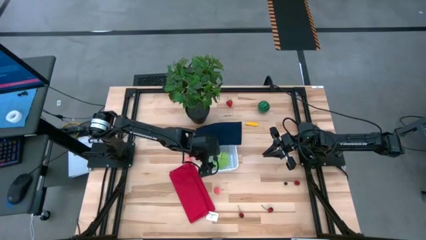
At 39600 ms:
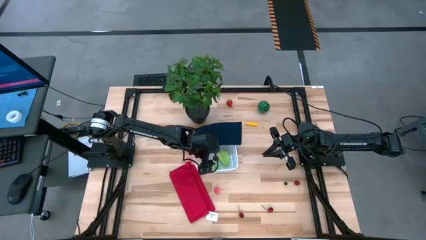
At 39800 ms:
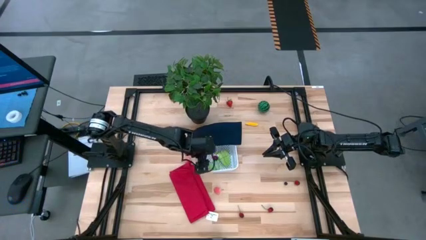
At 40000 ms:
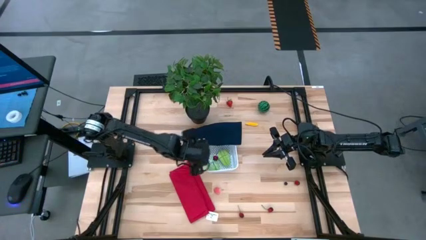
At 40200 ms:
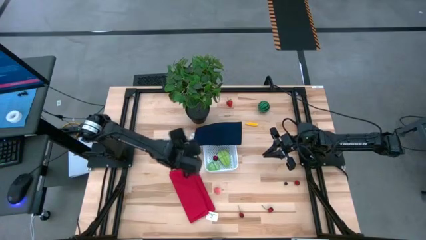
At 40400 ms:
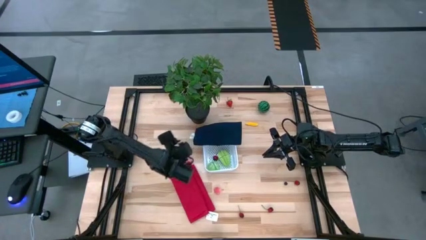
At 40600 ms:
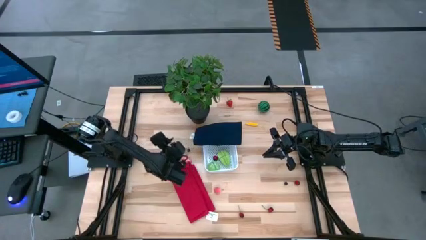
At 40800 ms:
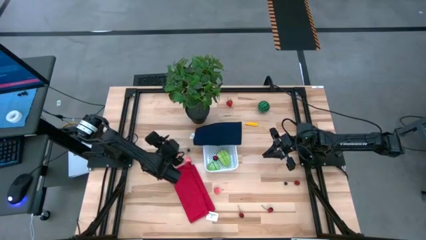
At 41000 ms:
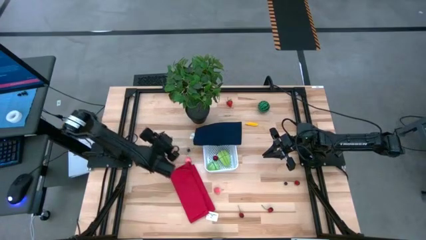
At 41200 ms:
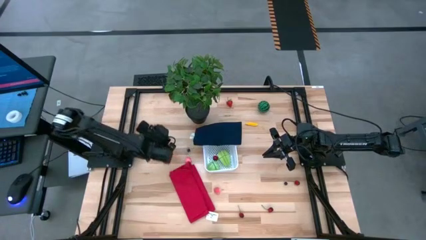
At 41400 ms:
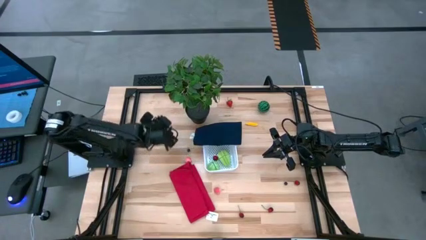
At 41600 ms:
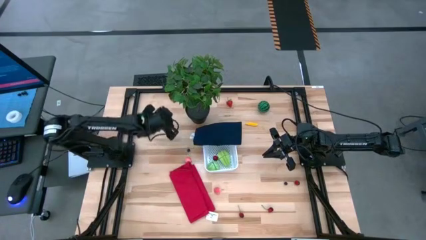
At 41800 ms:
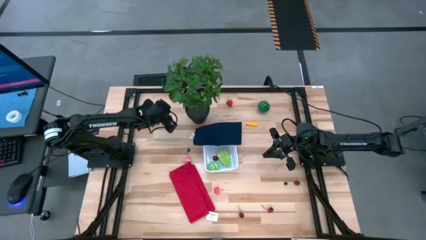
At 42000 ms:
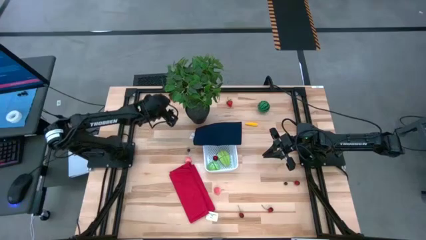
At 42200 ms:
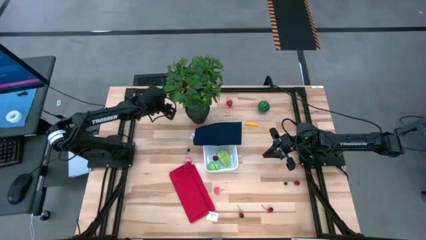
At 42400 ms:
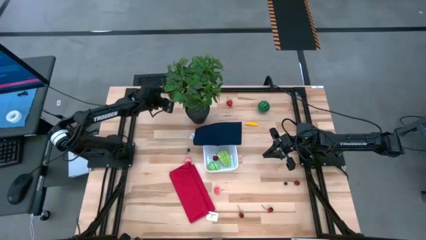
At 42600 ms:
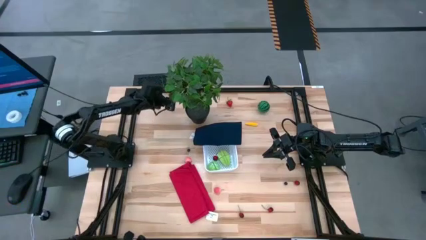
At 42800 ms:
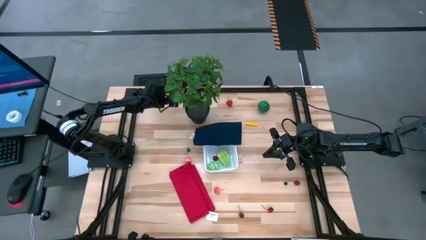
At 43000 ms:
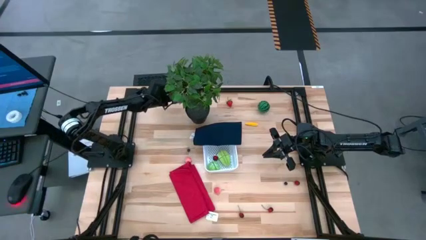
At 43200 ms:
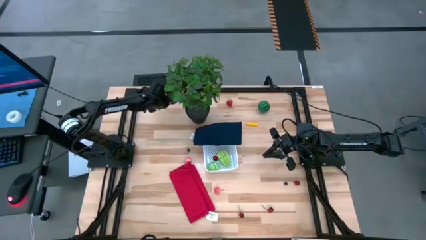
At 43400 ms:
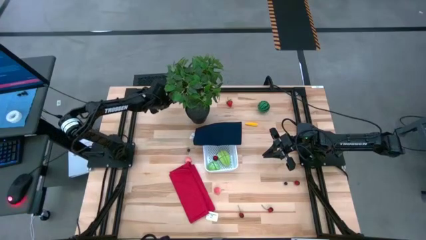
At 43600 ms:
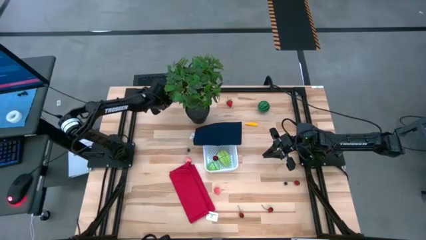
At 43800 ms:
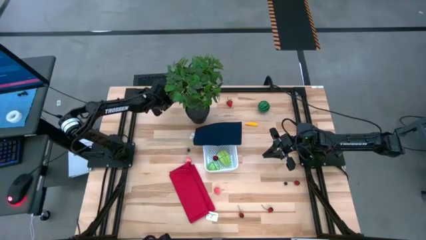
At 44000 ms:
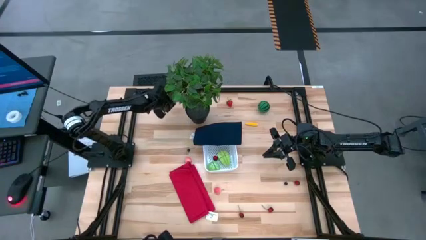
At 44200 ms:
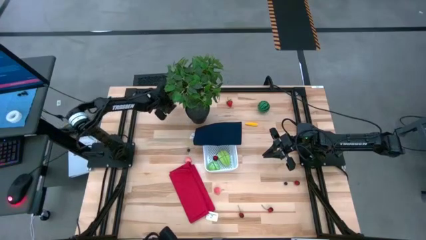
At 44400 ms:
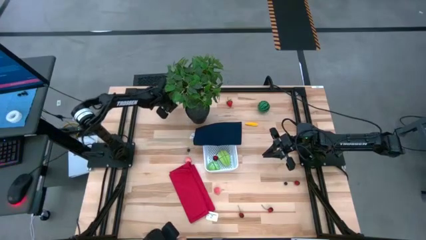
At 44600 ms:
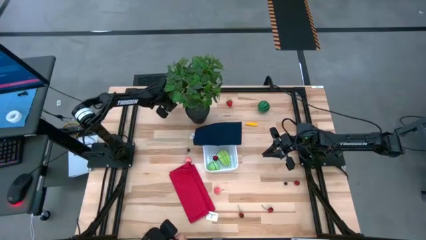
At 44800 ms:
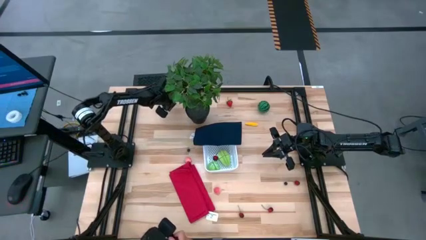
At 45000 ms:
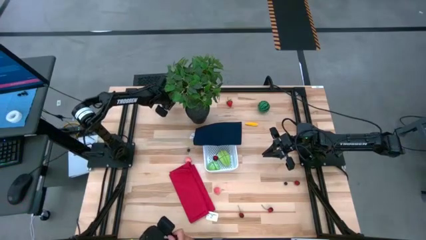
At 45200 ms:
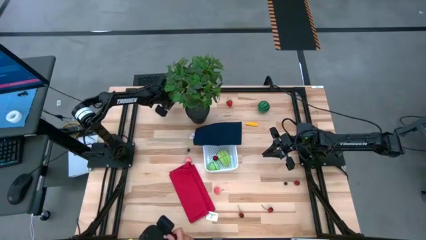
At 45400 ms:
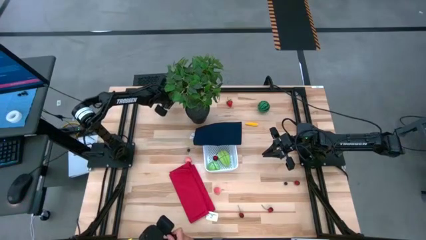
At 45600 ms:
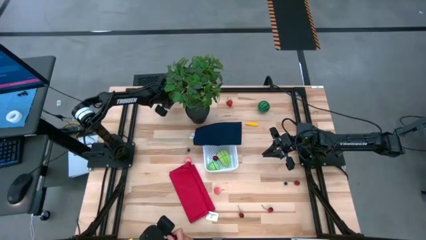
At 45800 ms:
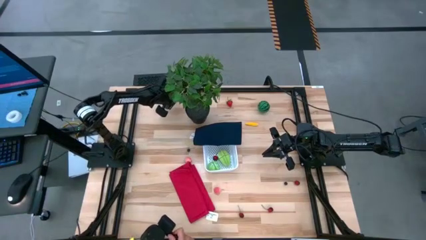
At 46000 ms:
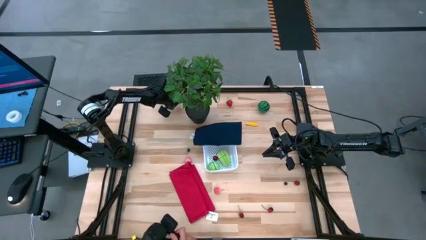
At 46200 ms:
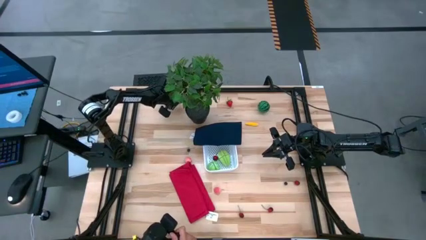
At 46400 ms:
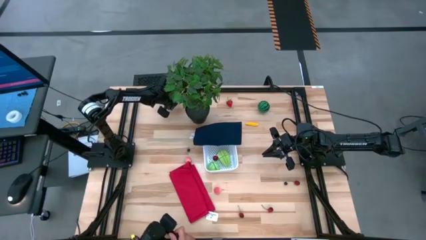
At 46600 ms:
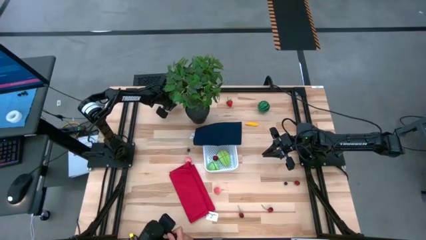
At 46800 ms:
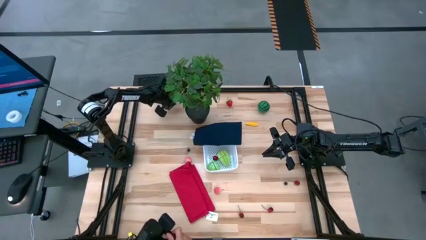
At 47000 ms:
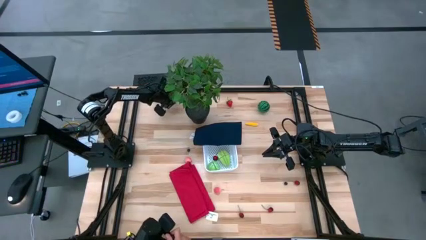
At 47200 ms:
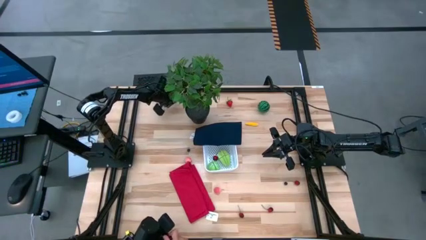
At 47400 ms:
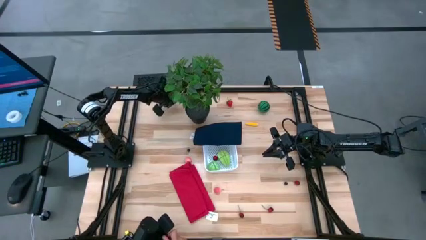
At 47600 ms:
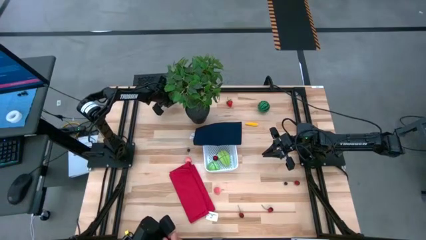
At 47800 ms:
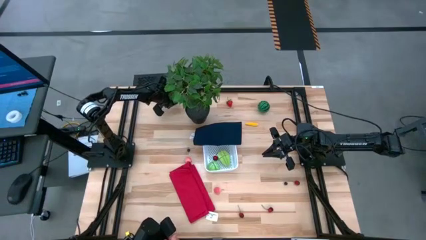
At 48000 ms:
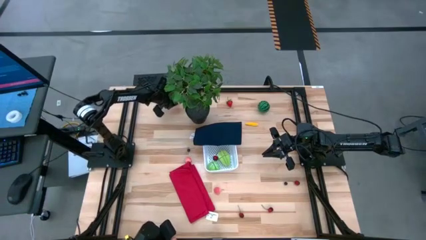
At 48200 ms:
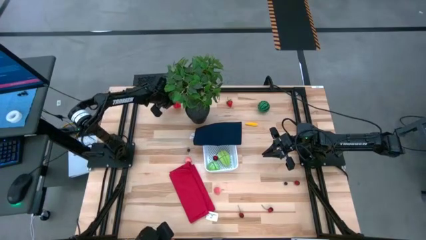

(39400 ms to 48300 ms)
Task: Pick and placing Produce into tupperware
Put the left strawberry into the bin

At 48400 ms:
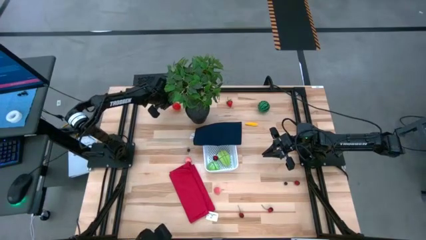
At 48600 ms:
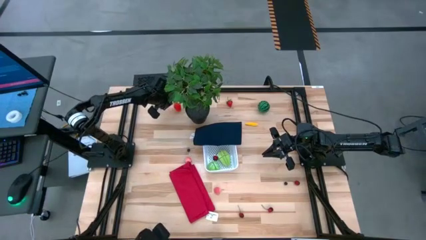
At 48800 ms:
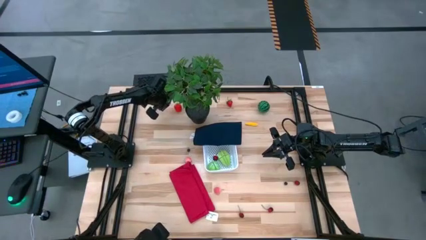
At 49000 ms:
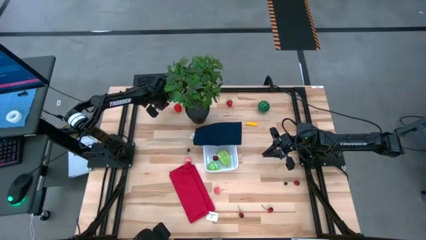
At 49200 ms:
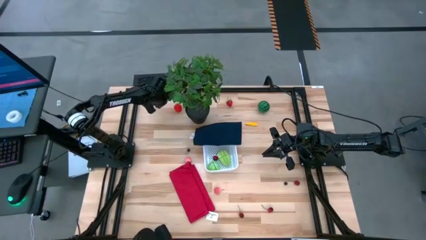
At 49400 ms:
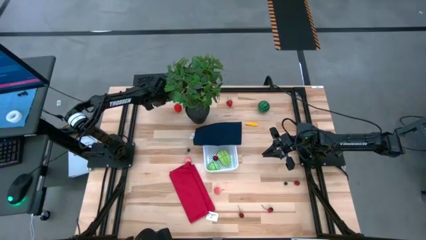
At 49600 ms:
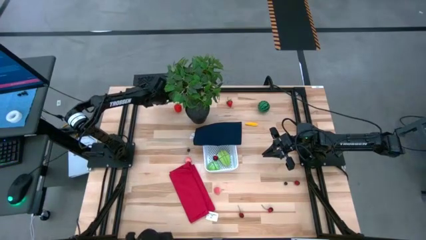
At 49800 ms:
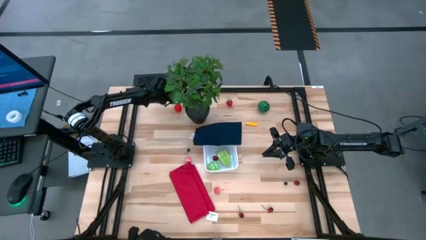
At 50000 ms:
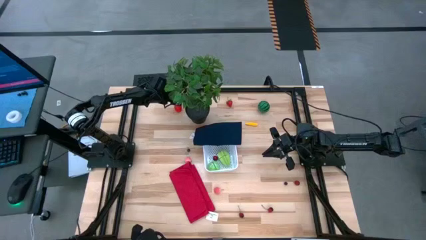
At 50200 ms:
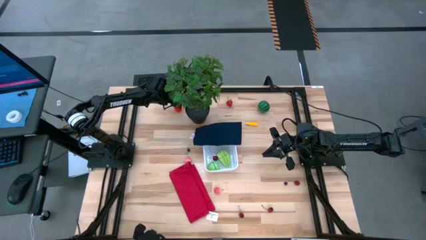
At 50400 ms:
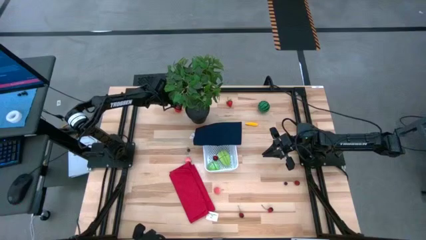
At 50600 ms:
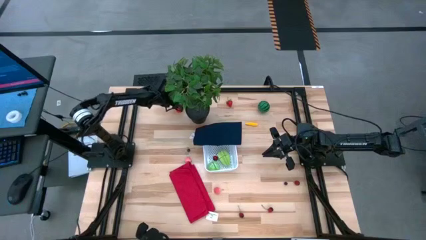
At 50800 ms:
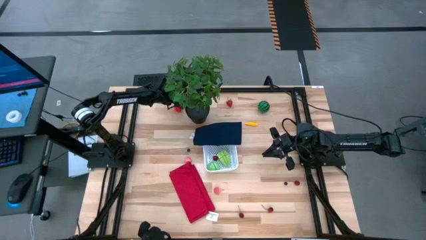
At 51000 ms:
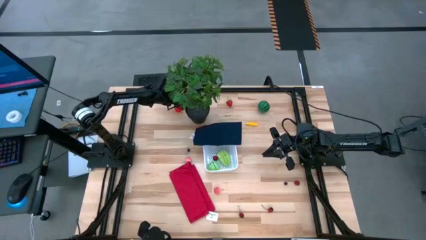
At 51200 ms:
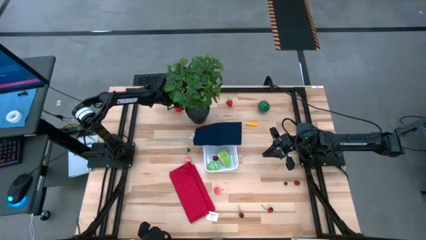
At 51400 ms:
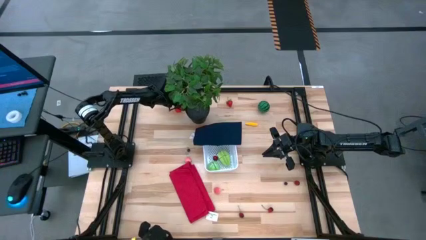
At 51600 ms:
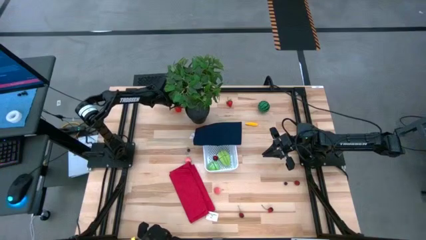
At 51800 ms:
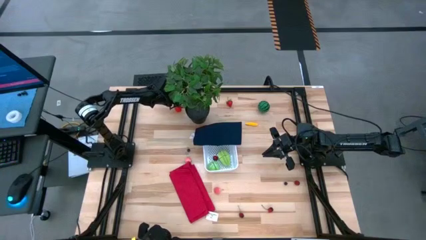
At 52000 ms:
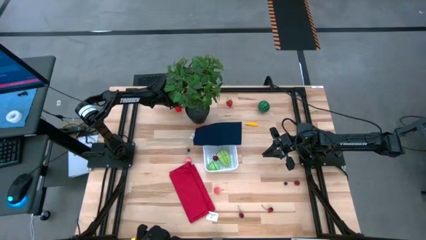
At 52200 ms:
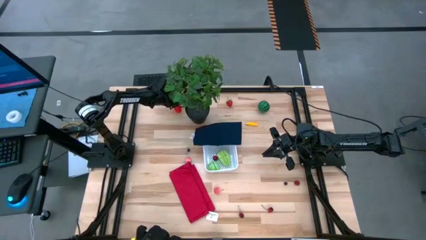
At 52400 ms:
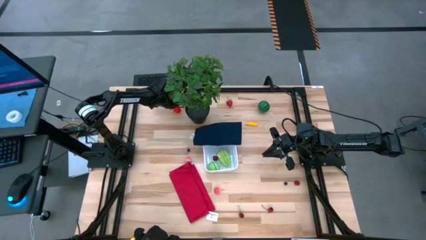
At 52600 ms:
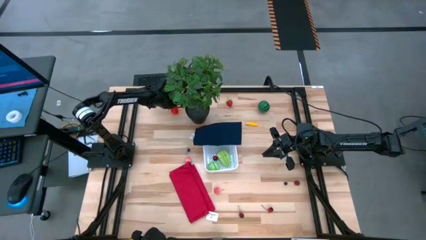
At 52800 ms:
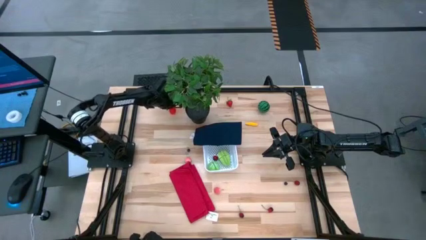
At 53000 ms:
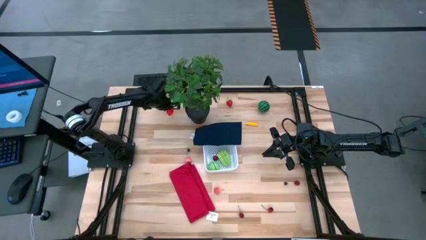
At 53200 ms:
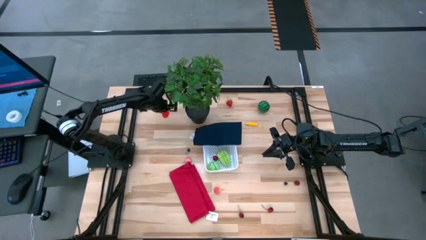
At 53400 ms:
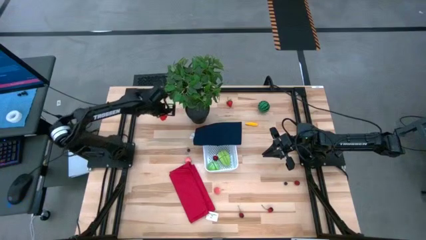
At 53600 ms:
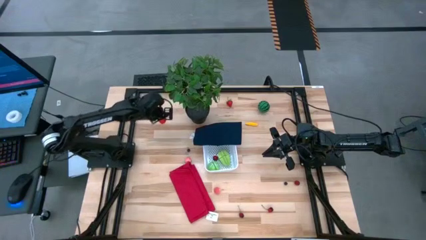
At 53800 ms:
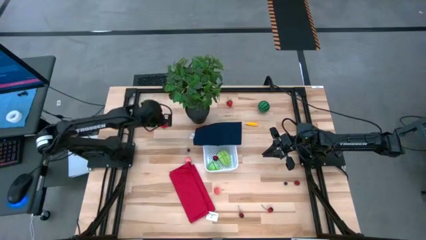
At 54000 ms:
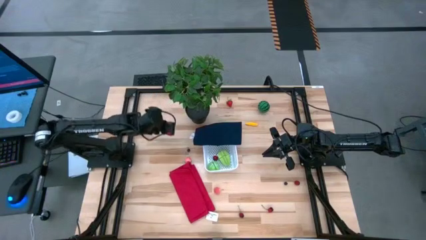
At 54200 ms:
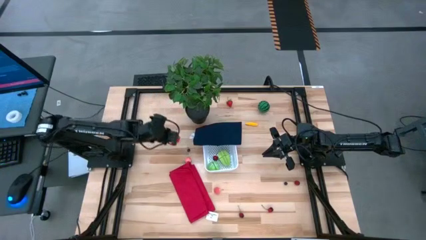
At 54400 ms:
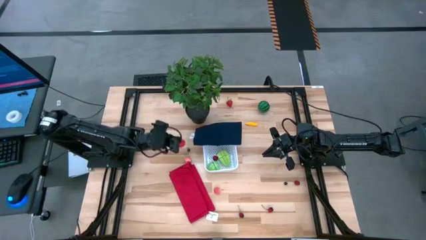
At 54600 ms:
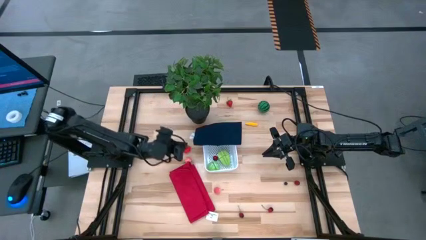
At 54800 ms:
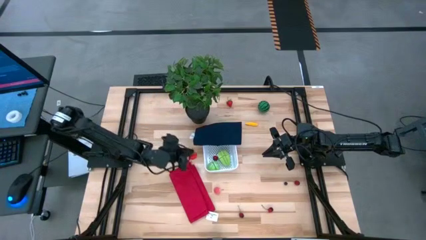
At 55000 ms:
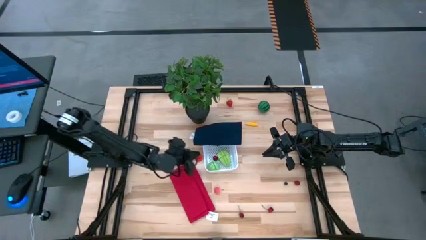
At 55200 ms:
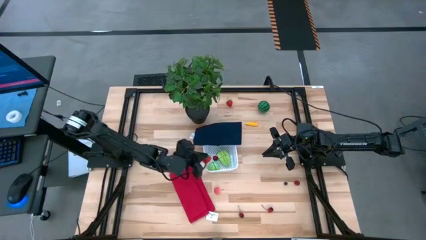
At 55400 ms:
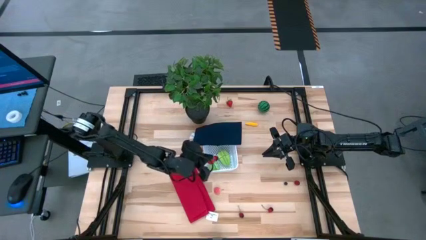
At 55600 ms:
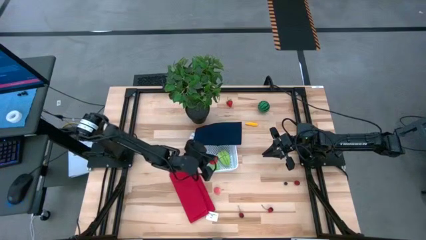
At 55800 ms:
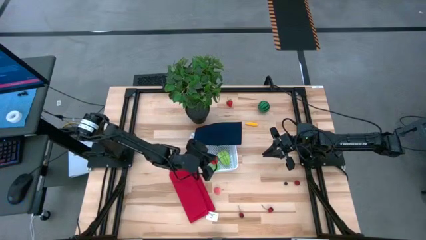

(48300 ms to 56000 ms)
Put the left strawberry into the bin
